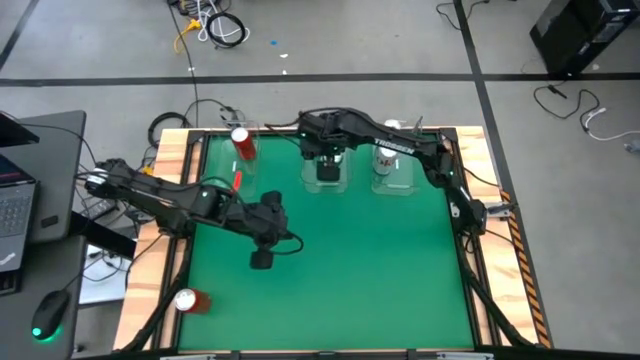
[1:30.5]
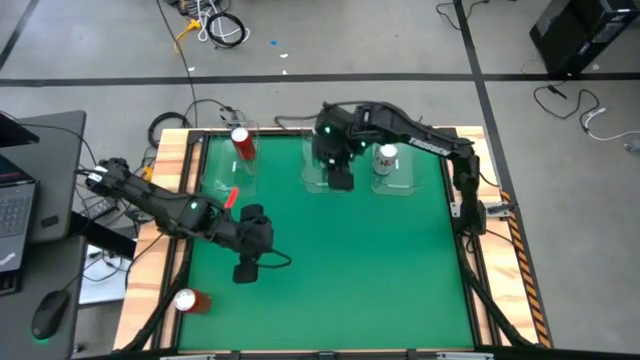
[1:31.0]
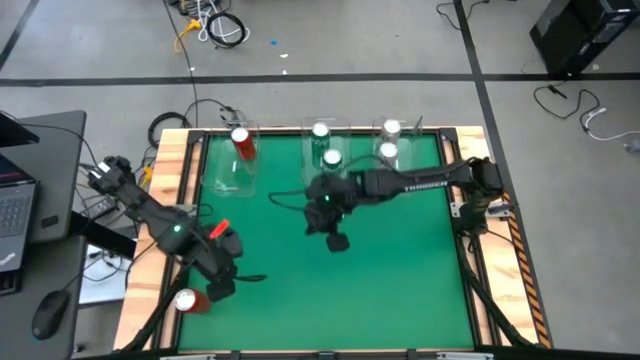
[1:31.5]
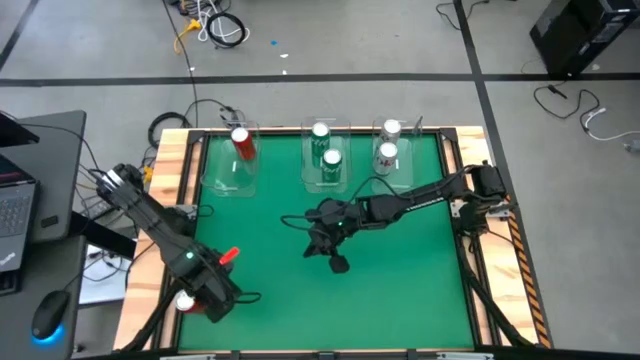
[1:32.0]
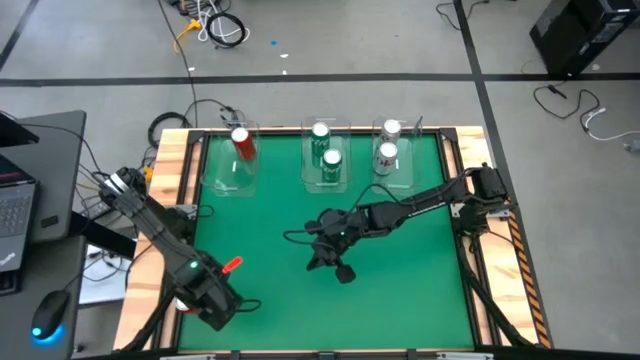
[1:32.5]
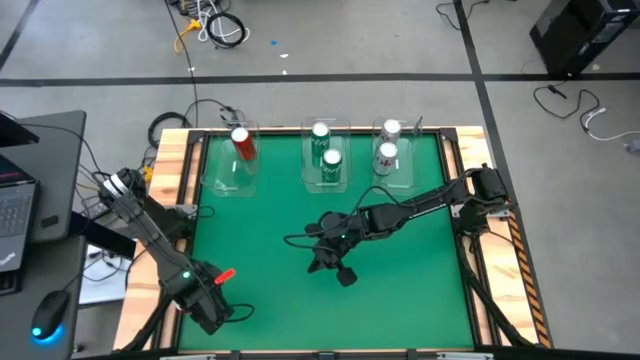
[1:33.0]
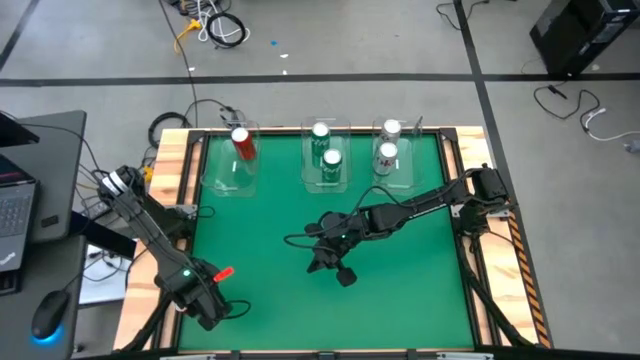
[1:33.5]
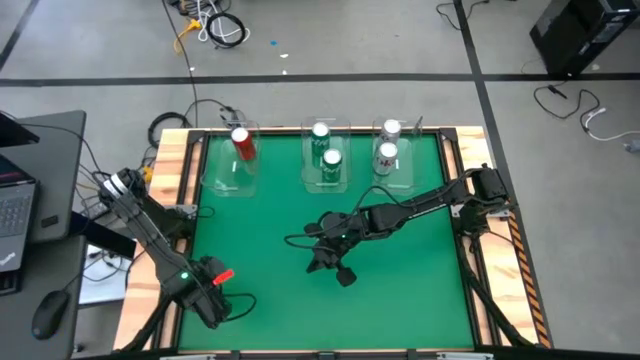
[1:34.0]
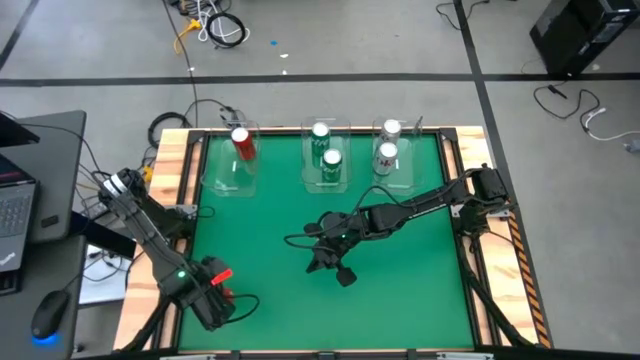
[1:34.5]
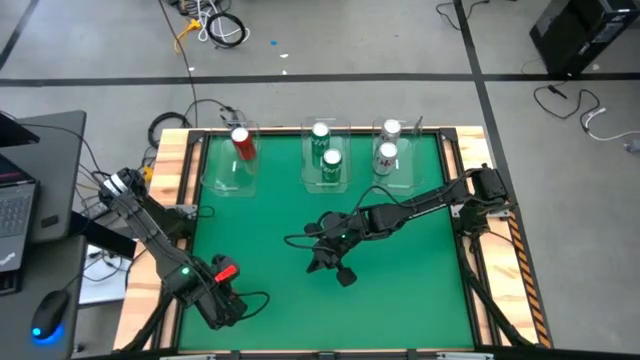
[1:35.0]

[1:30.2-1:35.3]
Task: Sort soda cans
Put the red soda can into the left transparent bin

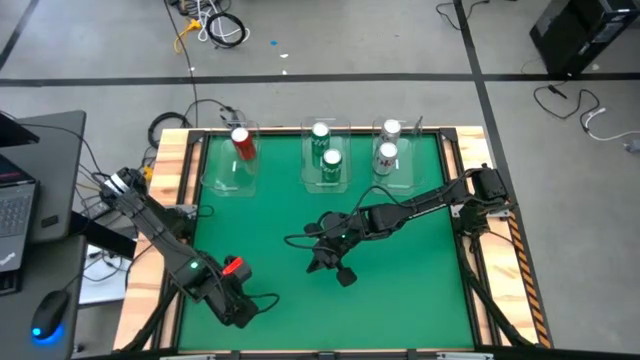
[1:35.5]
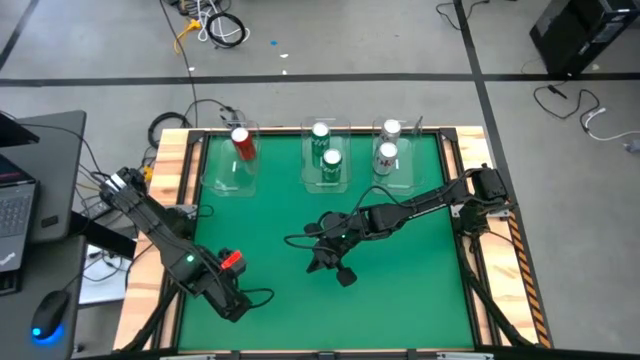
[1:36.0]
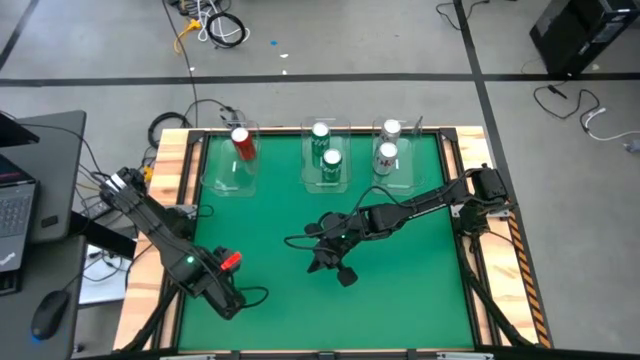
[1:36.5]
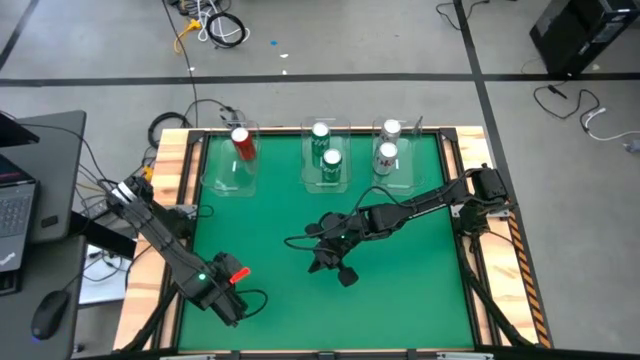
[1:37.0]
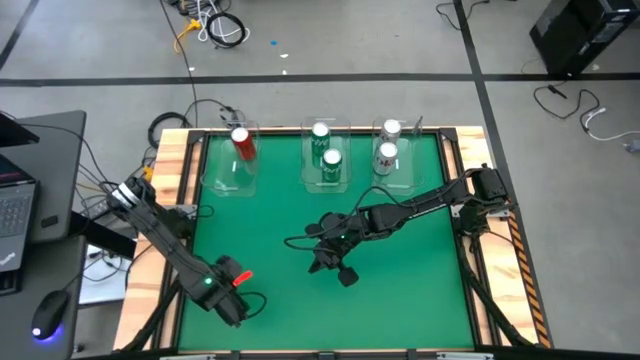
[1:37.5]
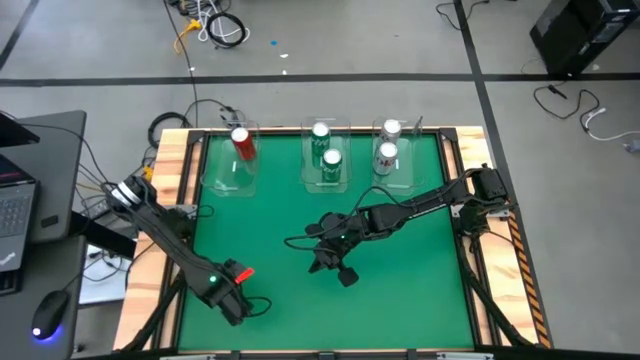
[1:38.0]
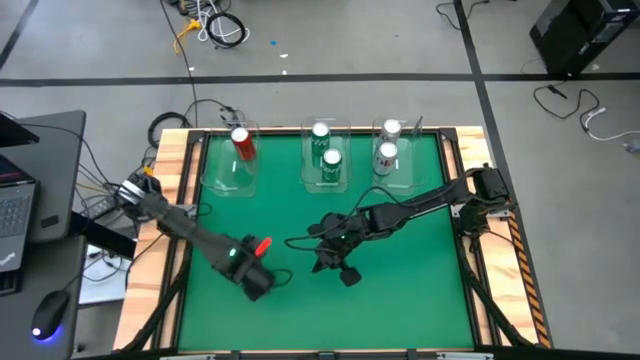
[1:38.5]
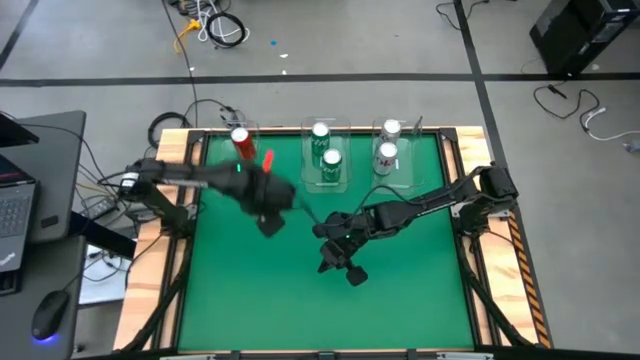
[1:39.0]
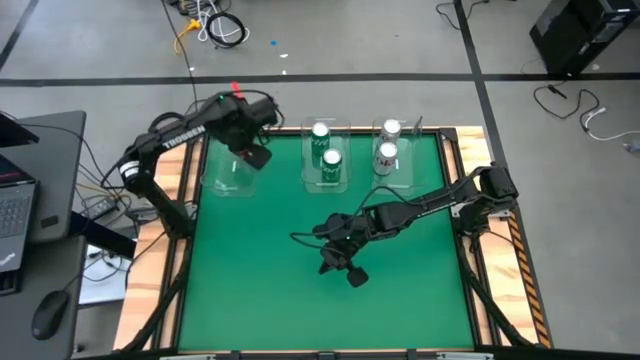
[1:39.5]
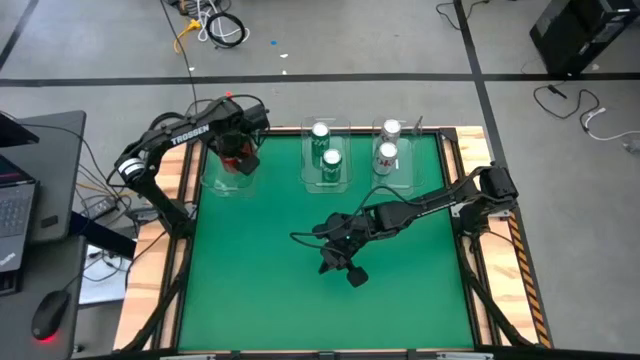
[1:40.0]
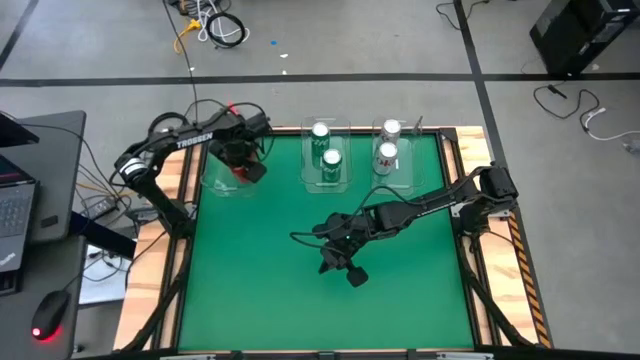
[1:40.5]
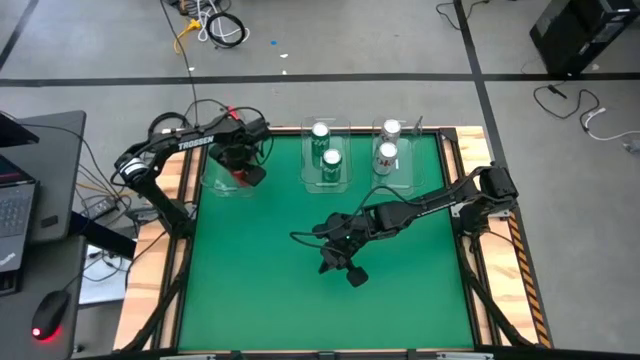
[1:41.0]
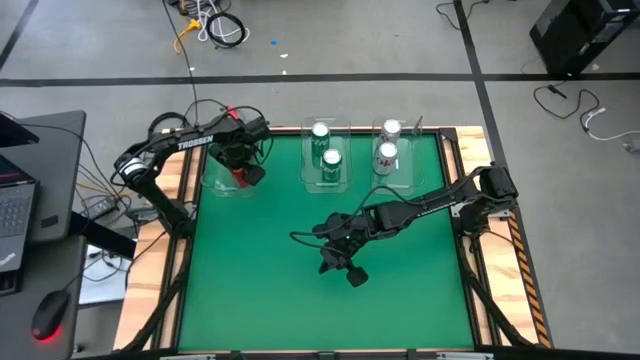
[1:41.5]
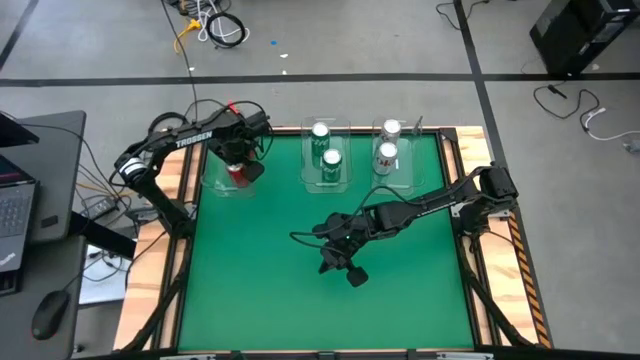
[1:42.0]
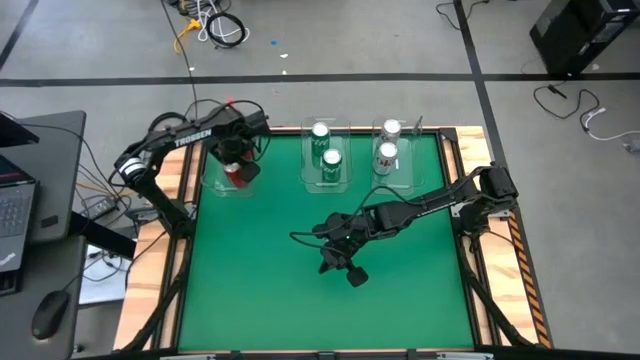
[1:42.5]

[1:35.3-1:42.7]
Put the red soda can into the left transparent bin

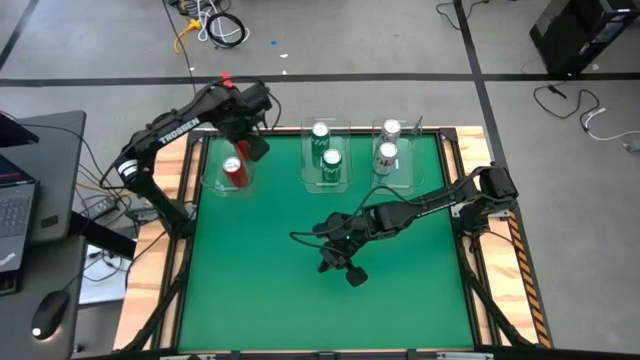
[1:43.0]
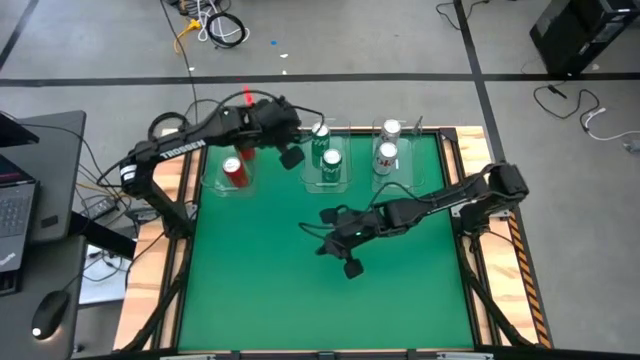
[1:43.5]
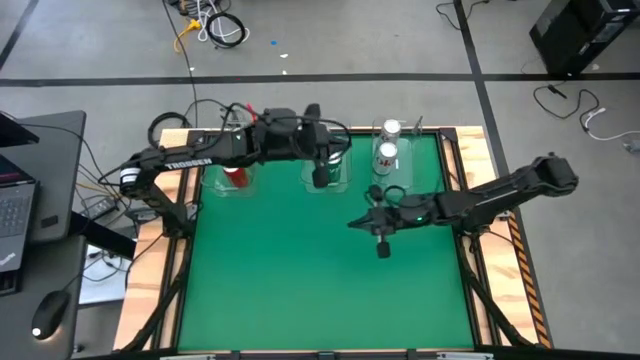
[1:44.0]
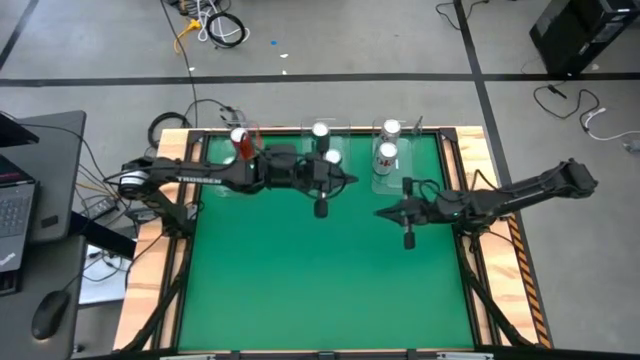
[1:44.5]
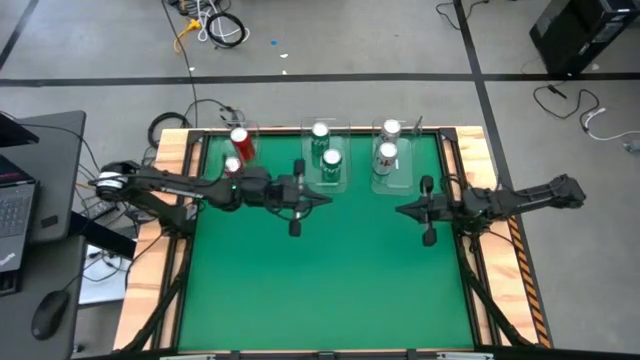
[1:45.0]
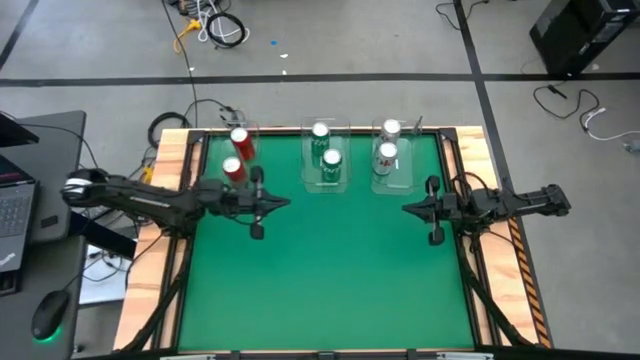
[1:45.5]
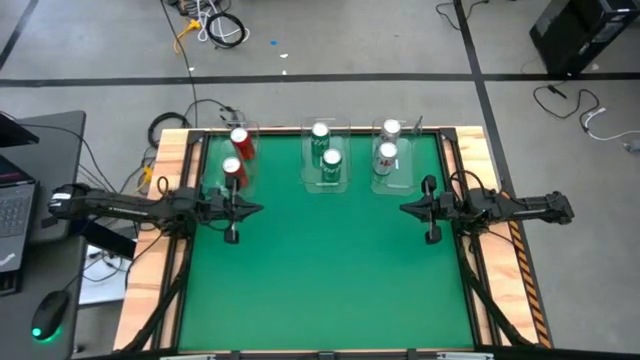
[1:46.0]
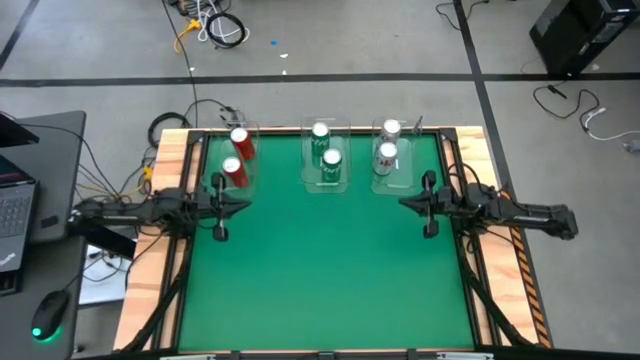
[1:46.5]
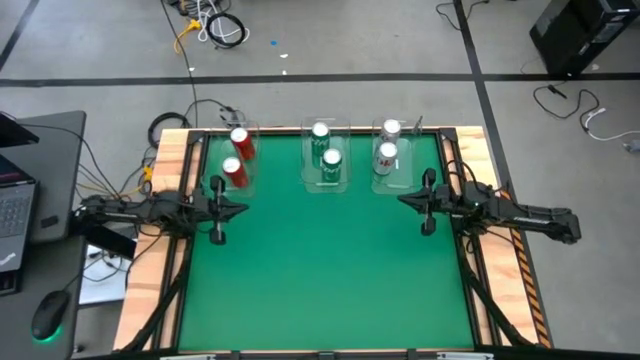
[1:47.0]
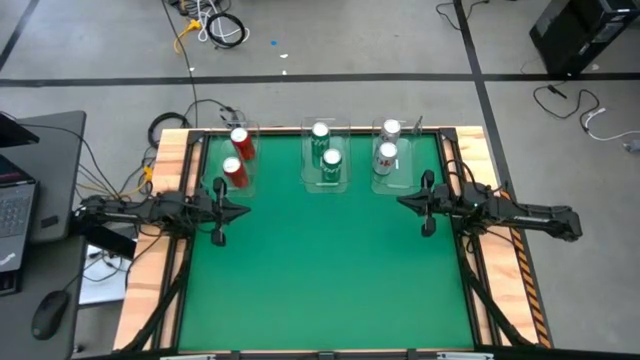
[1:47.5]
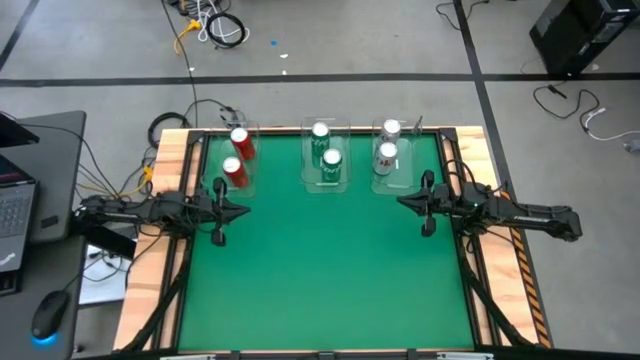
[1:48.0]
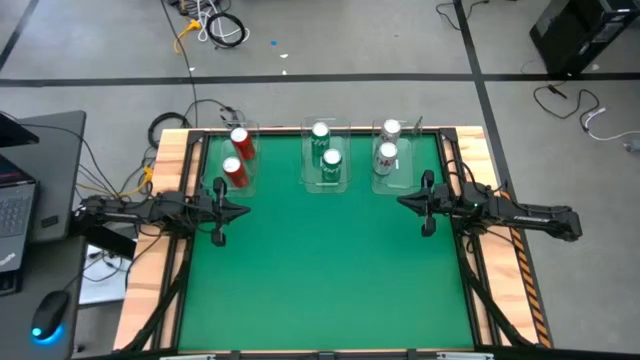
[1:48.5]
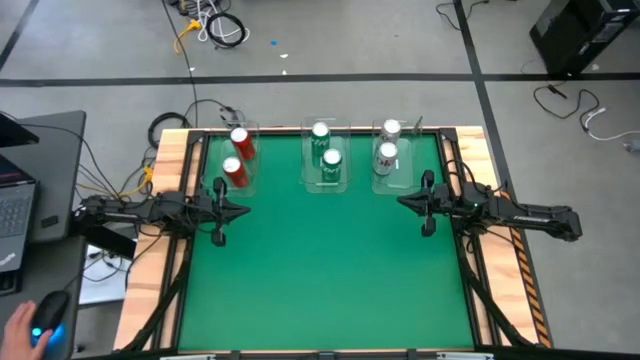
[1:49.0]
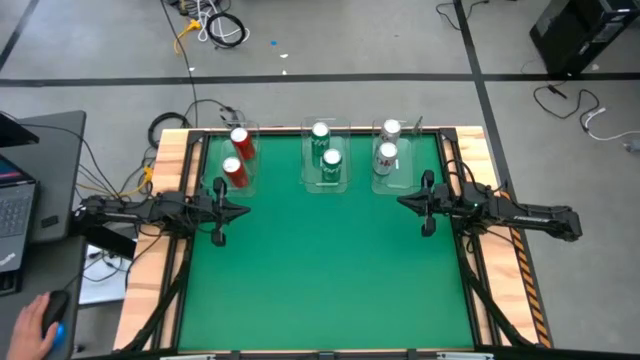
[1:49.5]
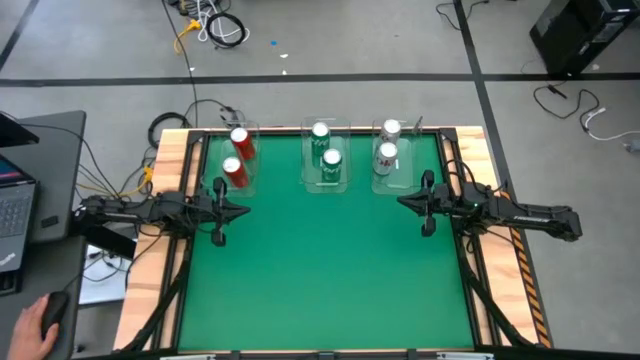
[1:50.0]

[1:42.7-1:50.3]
Return to Home Position
